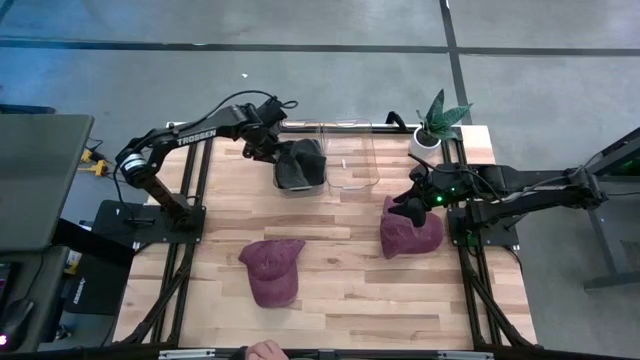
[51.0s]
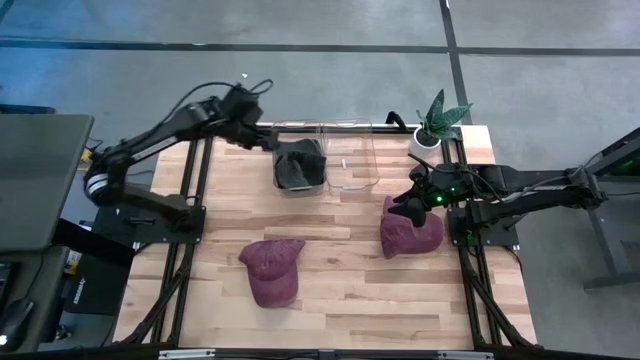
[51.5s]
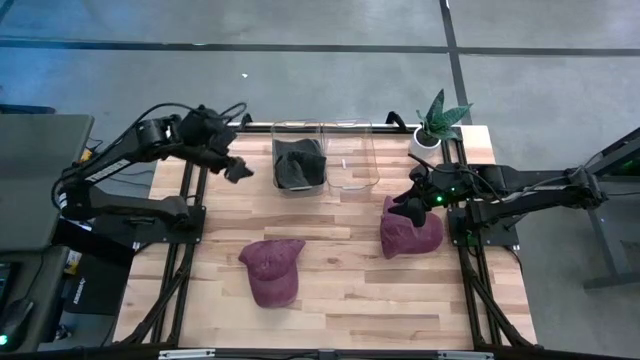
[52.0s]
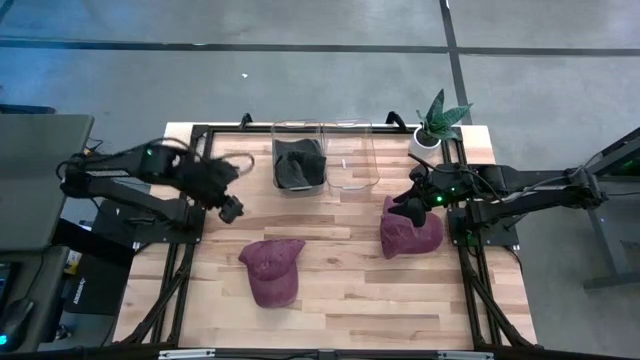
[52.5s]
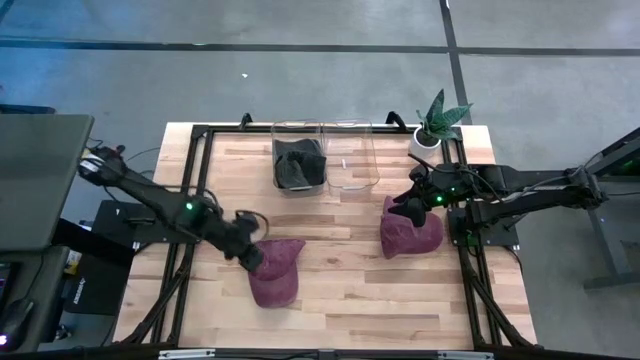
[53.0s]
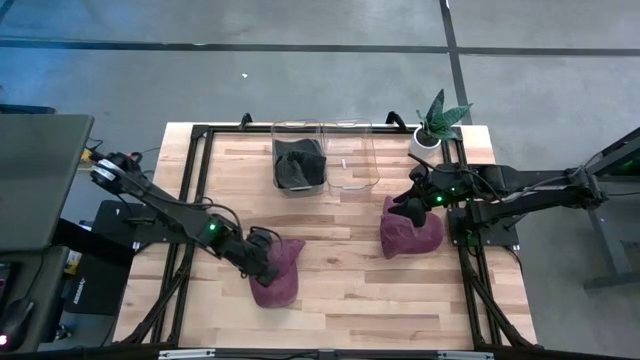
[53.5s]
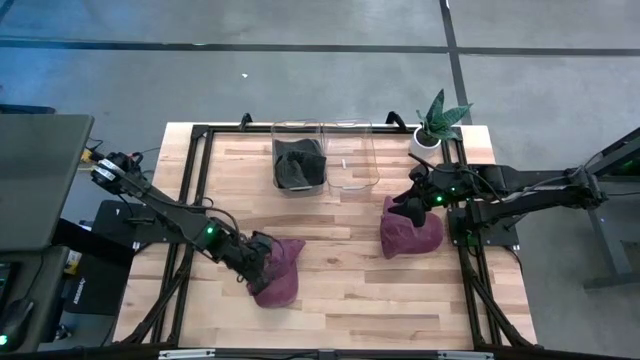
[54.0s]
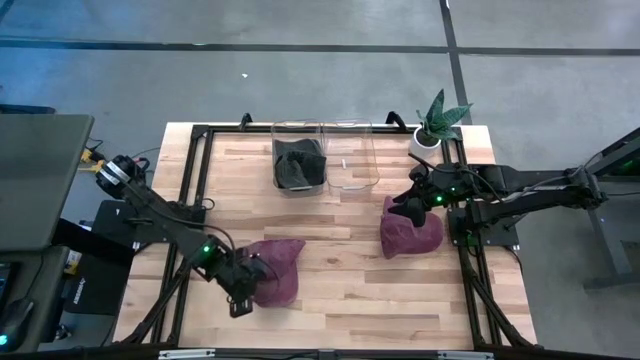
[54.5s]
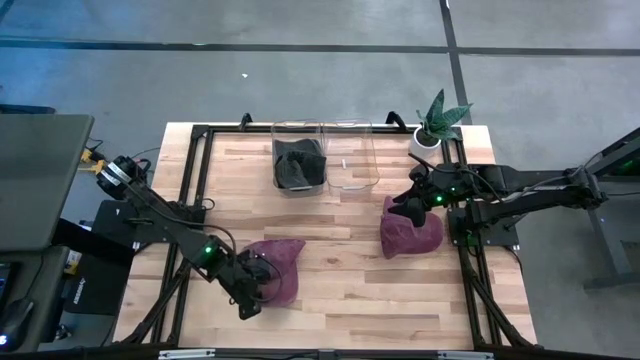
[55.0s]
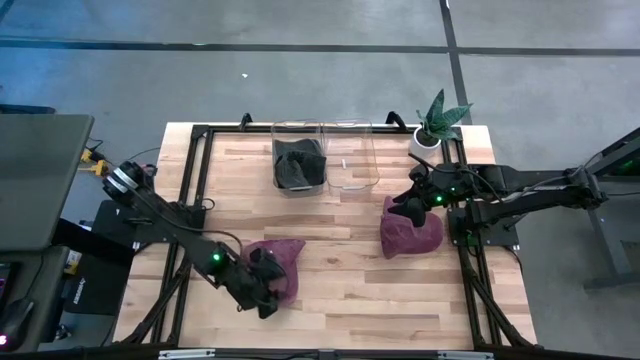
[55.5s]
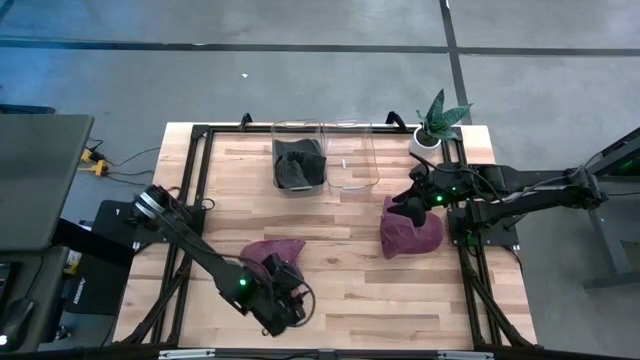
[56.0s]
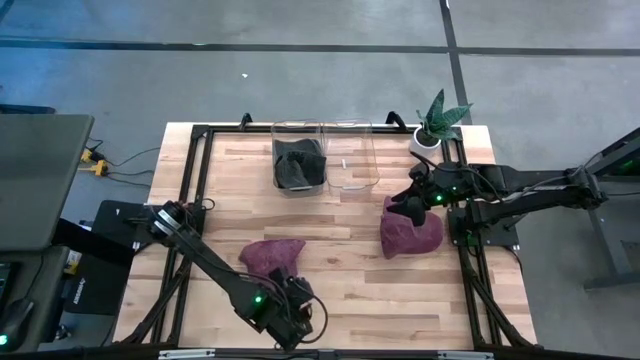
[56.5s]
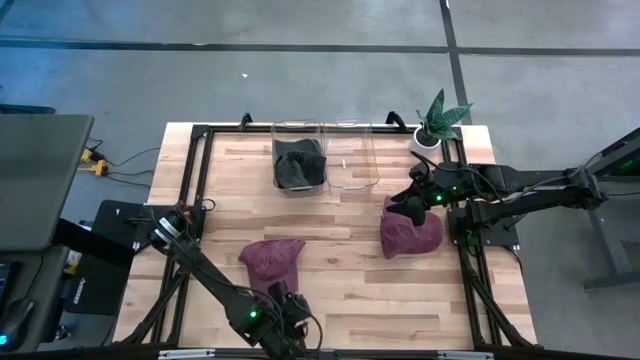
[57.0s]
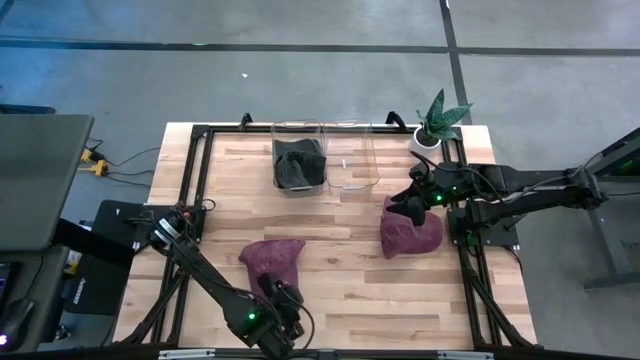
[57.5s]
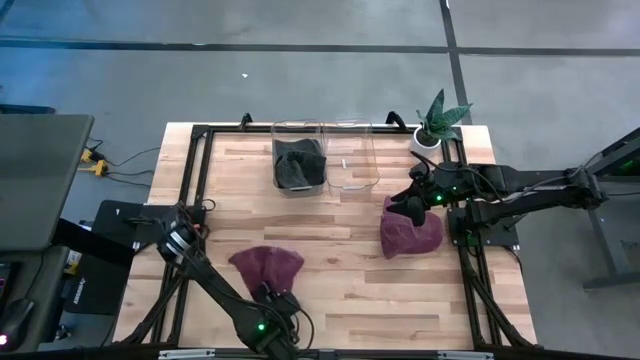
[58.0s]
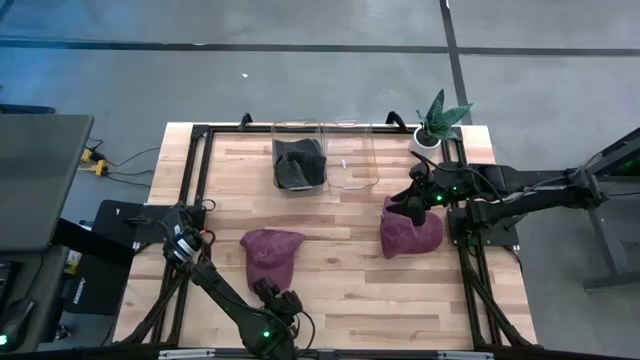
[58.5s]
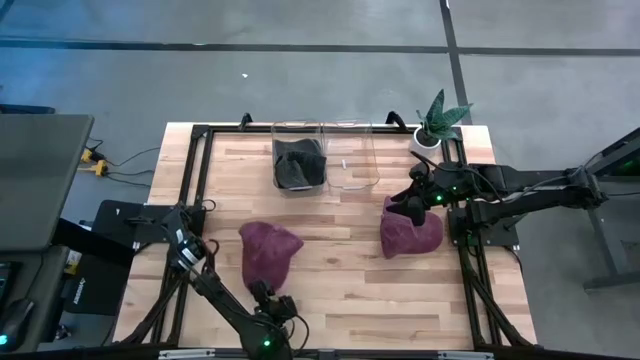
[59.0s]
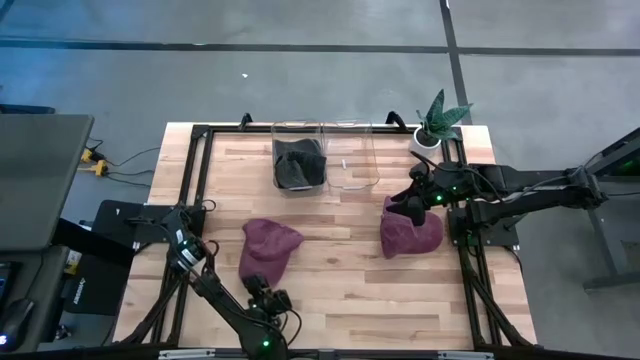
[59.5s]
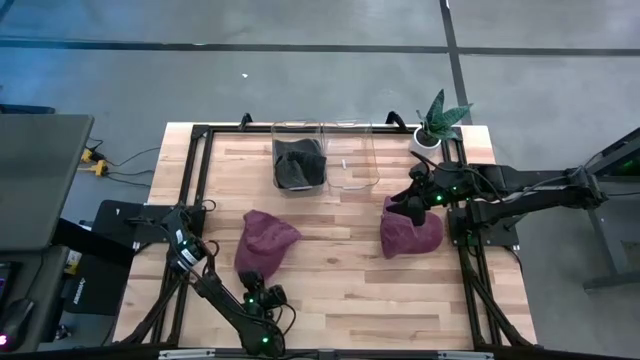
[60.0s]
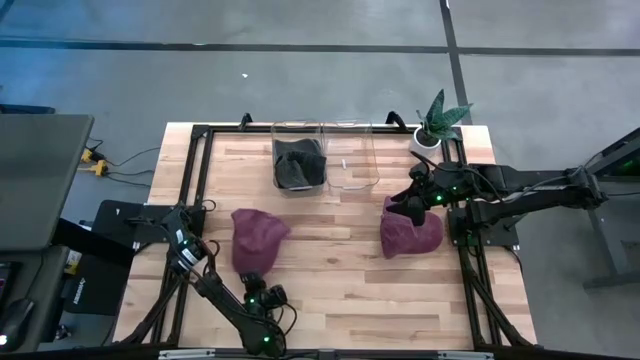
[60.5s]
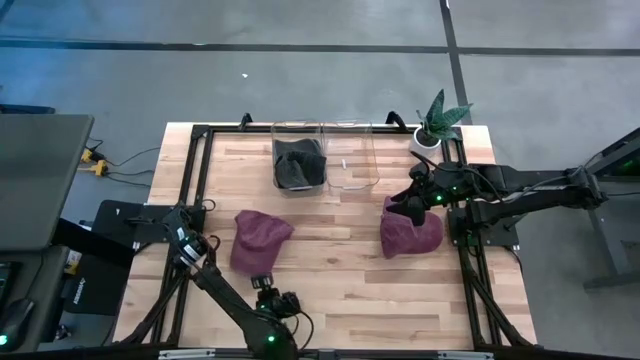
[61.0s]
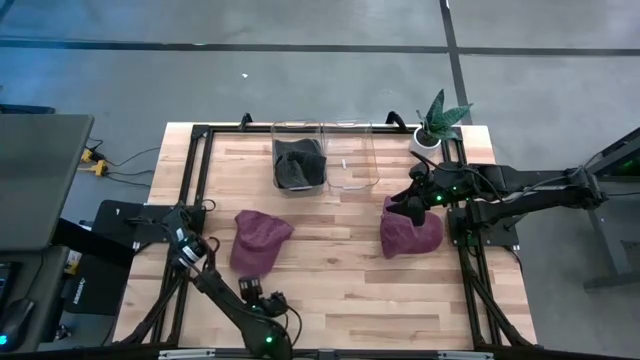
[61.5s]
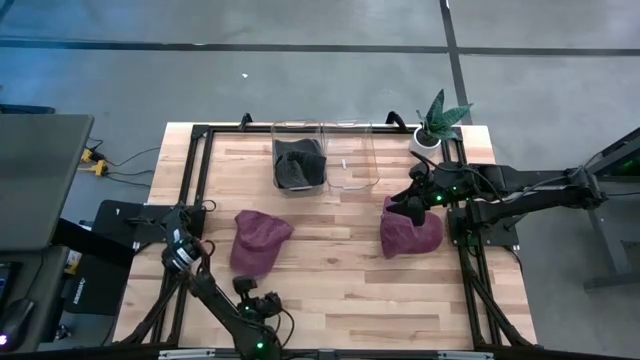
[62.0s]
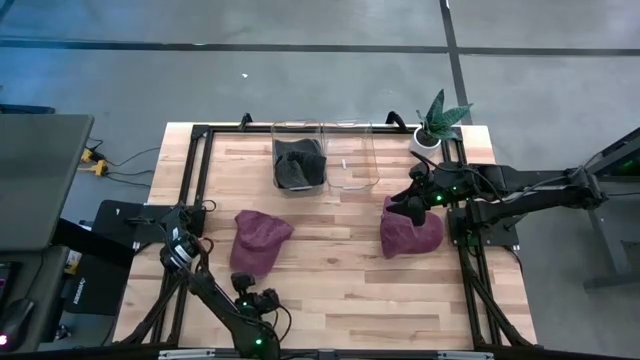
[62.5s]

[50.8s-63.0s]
Task: Pick & Place hat
Put the left red cap into the right transparent bin

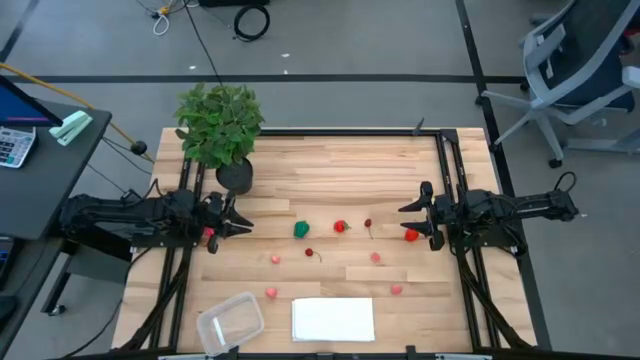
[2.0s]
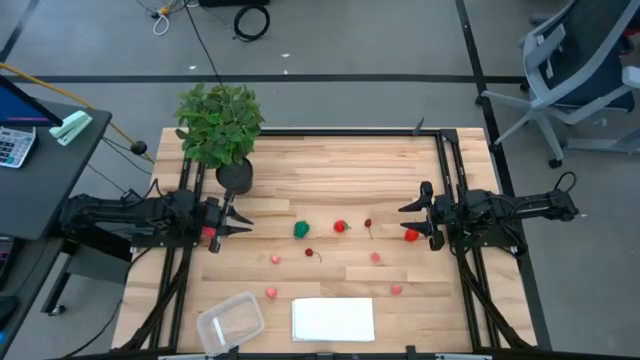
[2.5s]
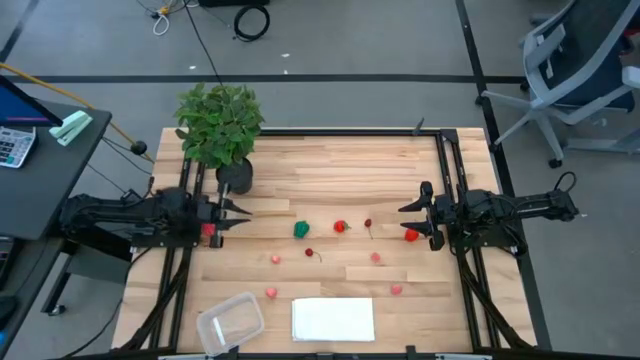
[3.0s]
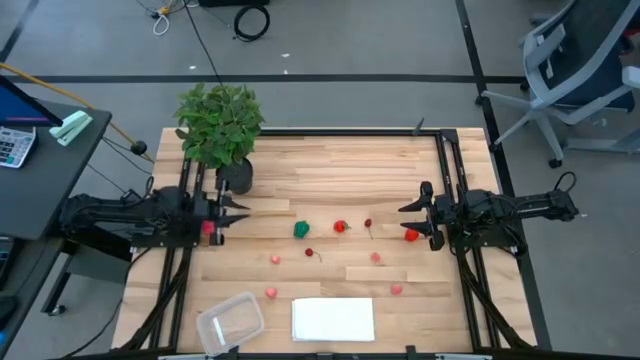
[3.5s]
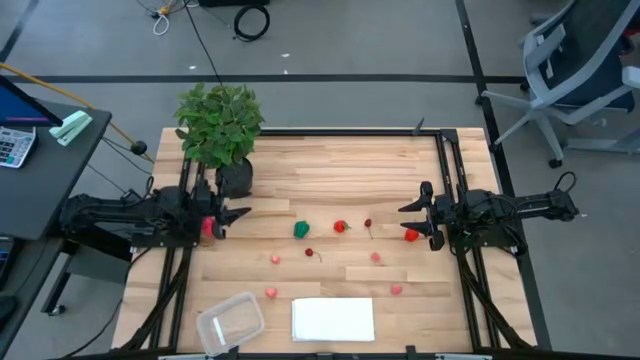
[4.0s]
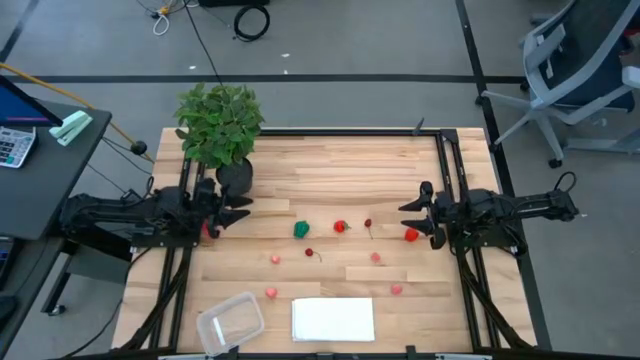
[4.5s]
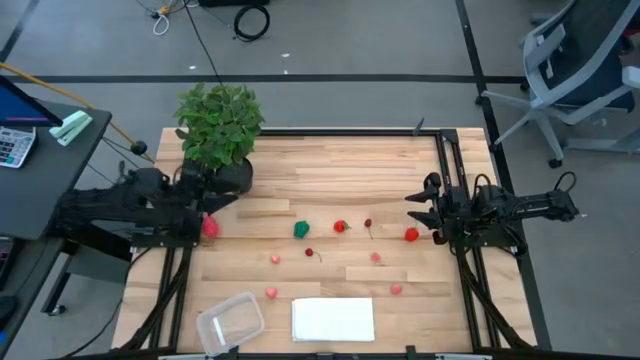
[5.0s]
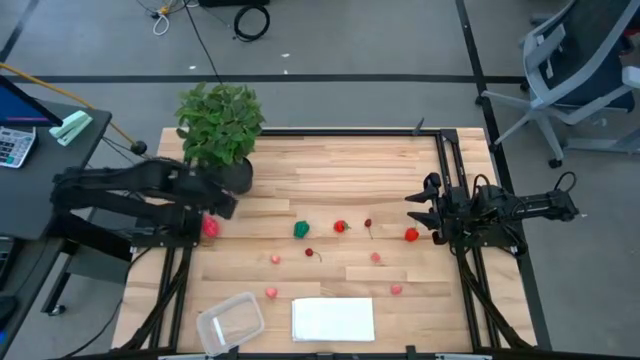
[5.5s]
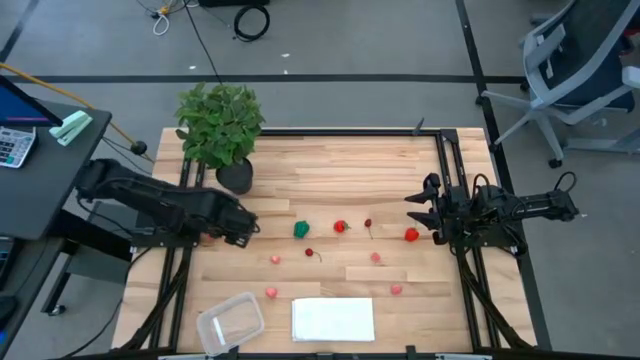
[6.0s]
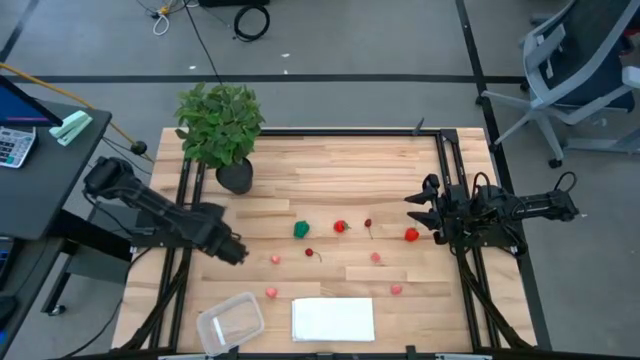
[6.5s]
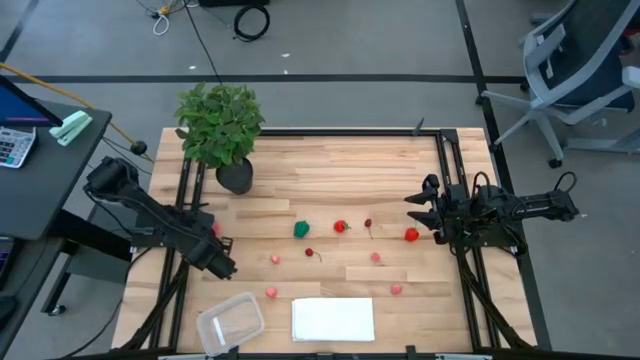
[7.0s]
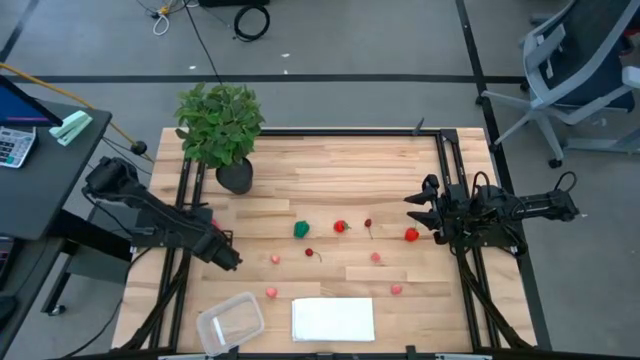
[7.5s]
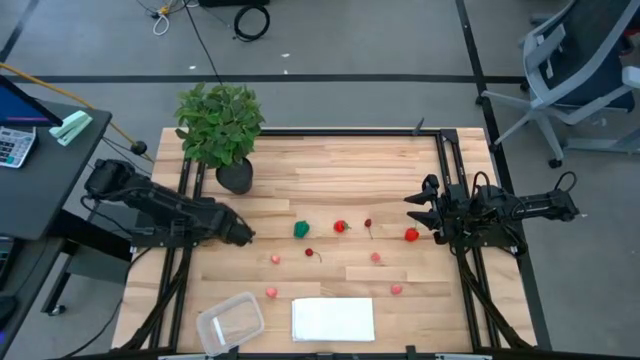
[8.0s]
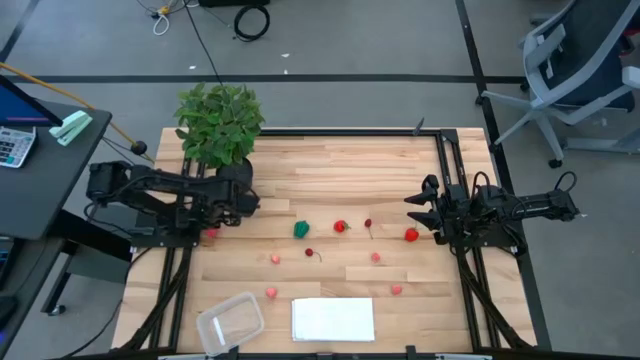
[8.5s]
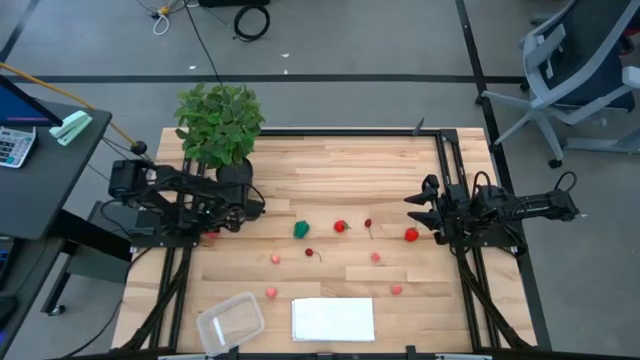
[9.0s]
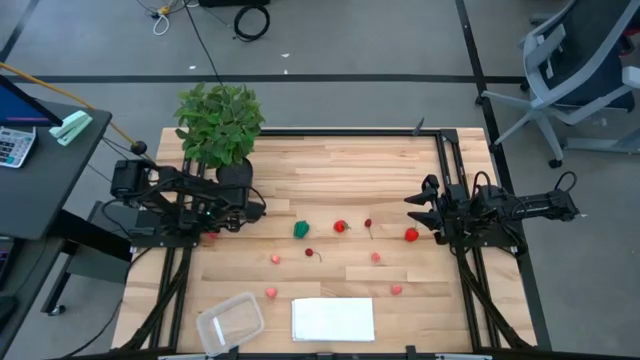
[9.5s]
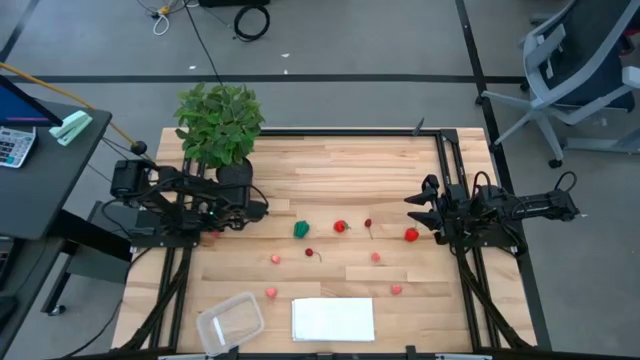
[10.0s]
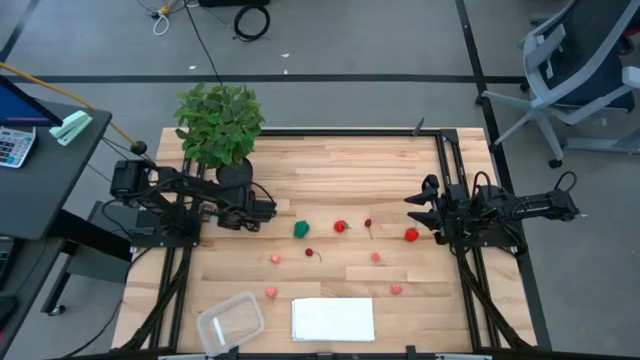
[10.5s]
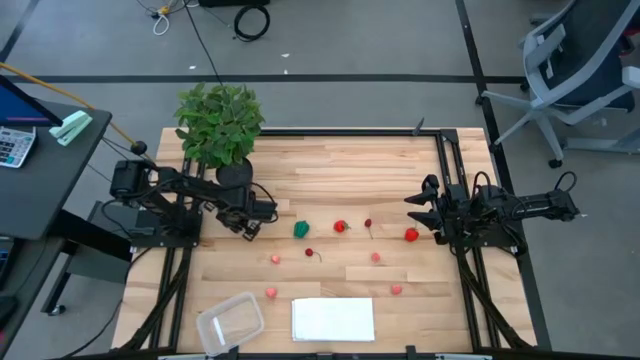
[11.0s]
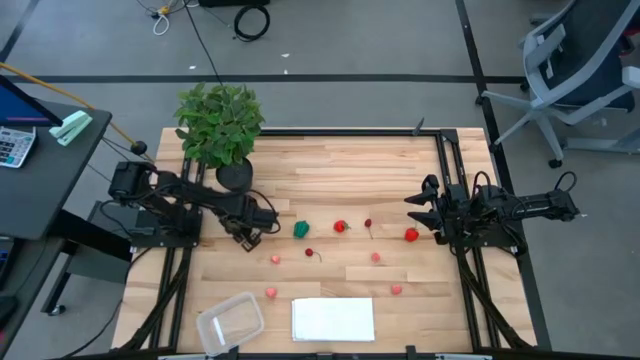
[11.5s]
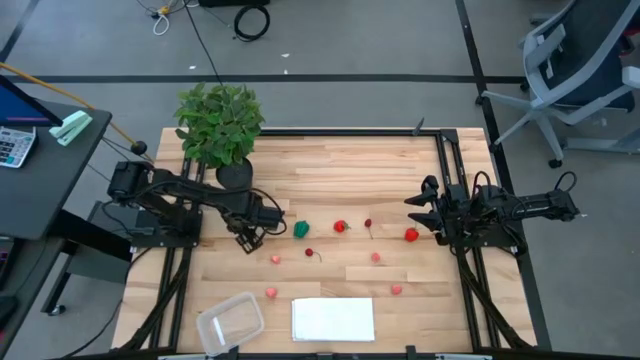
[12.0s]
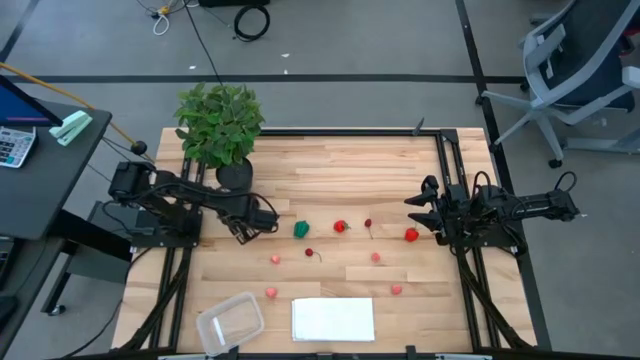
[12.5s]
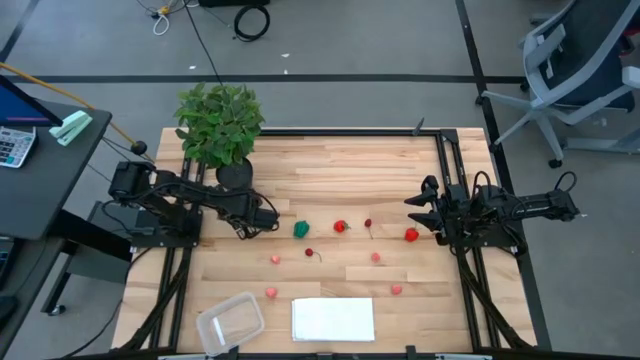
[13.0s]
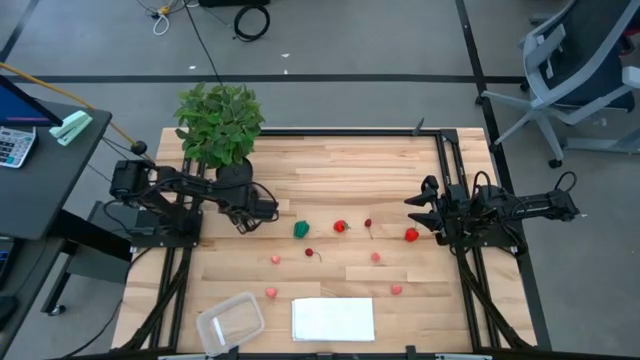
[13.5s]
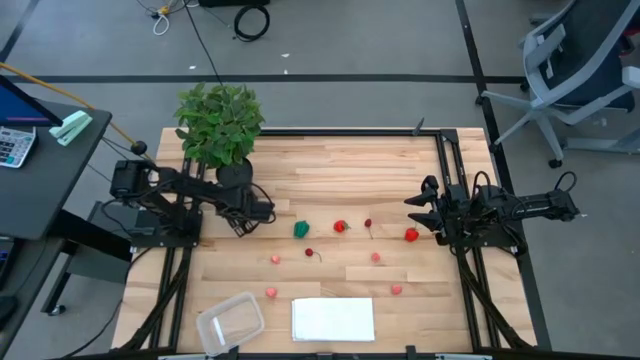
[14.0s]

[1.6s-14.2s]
Task: Pick and placing Produce into tupperware
Put the red dragon fruit into the transparent bin
